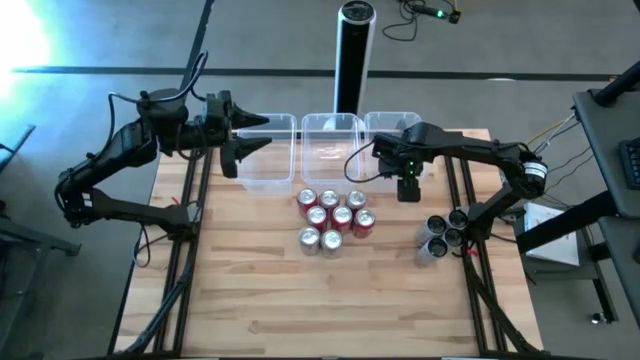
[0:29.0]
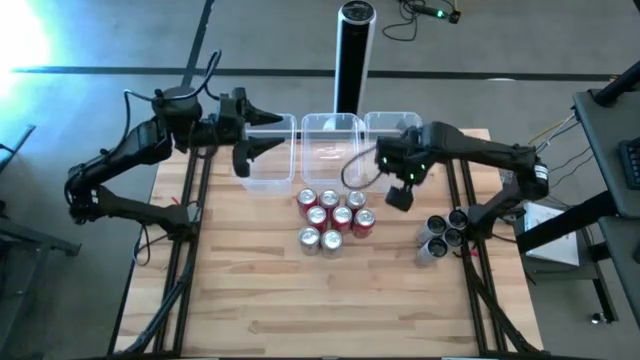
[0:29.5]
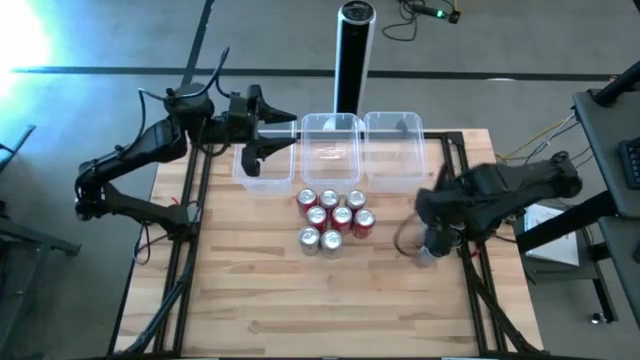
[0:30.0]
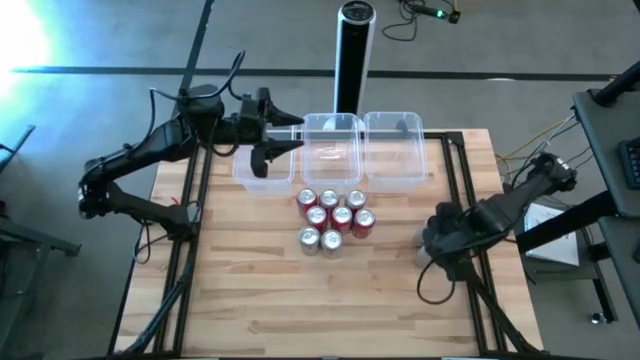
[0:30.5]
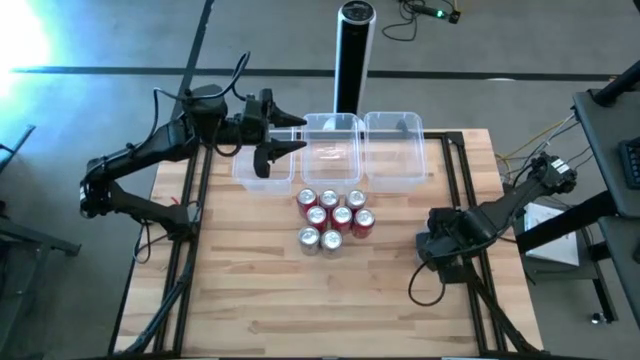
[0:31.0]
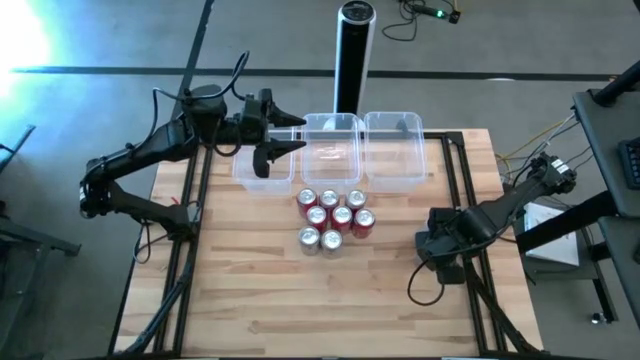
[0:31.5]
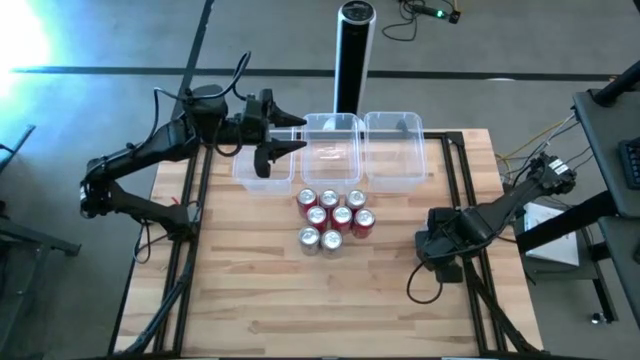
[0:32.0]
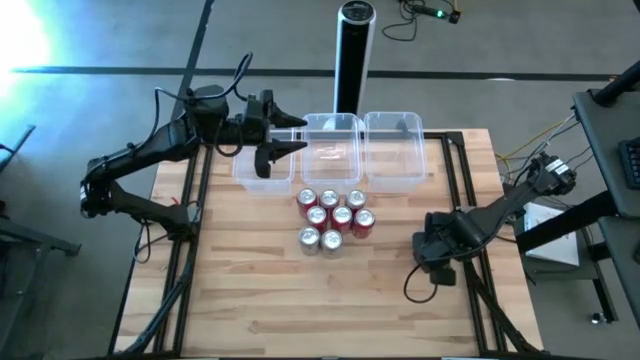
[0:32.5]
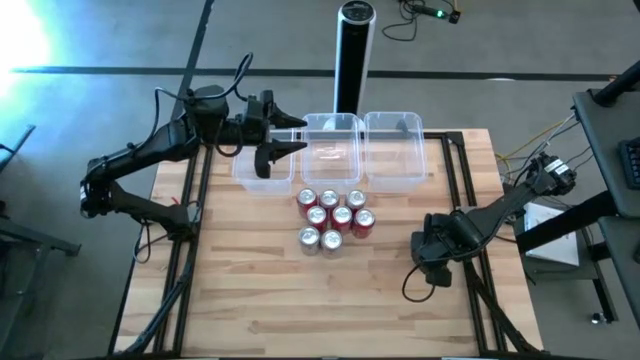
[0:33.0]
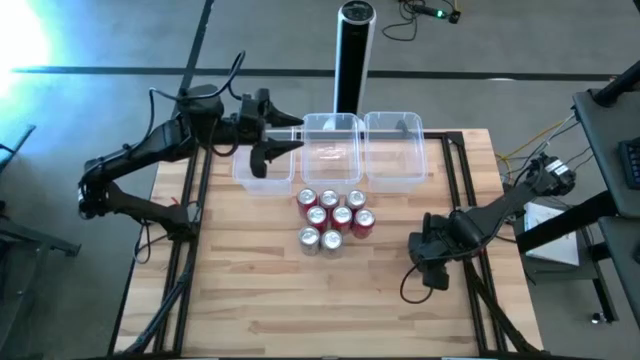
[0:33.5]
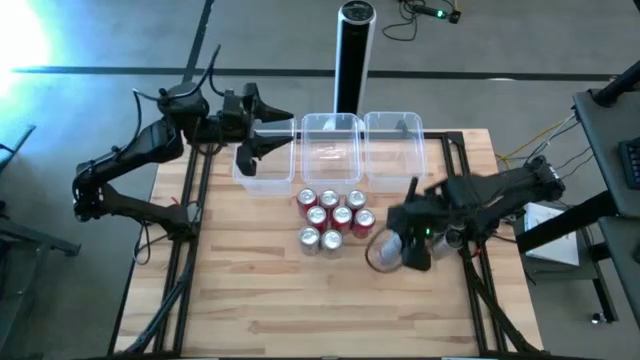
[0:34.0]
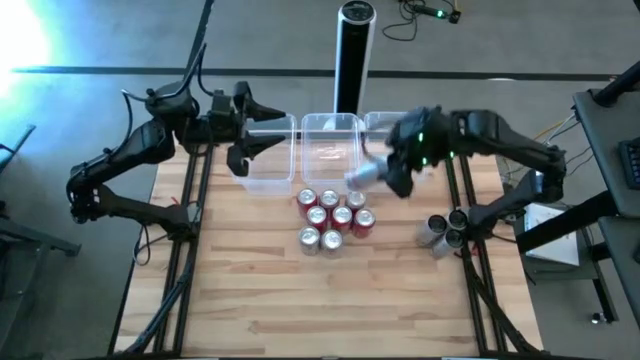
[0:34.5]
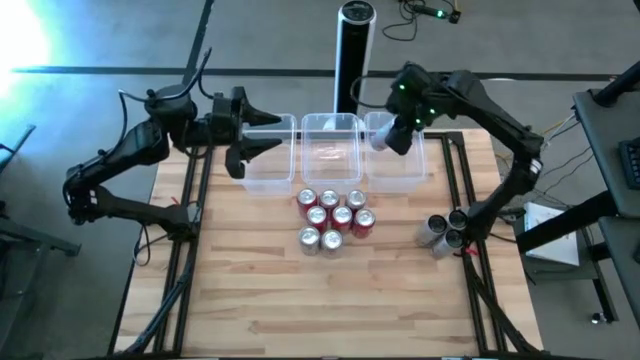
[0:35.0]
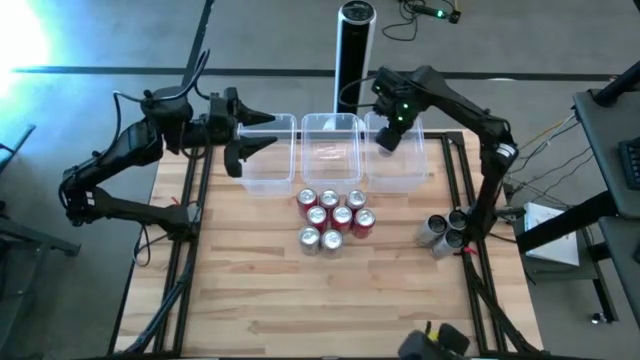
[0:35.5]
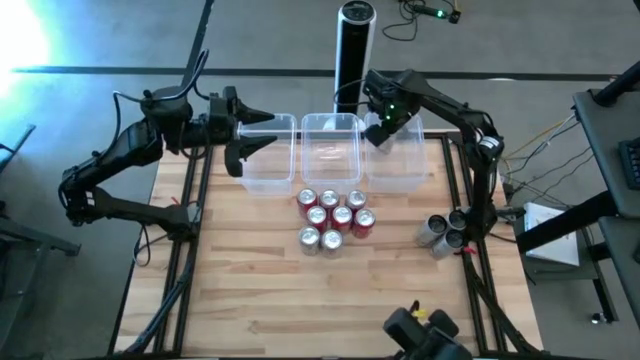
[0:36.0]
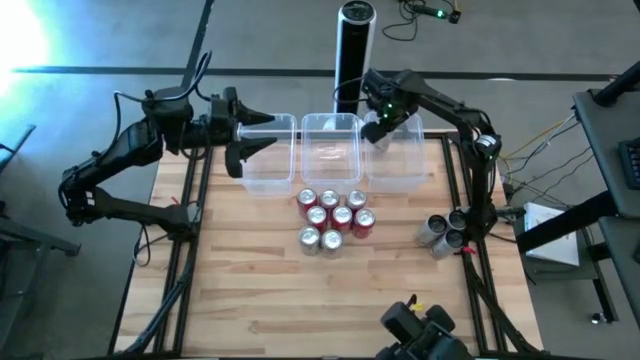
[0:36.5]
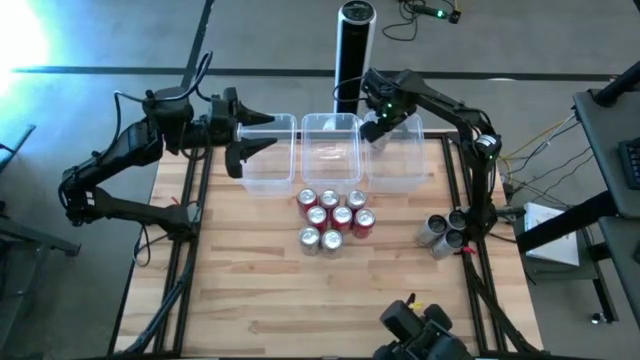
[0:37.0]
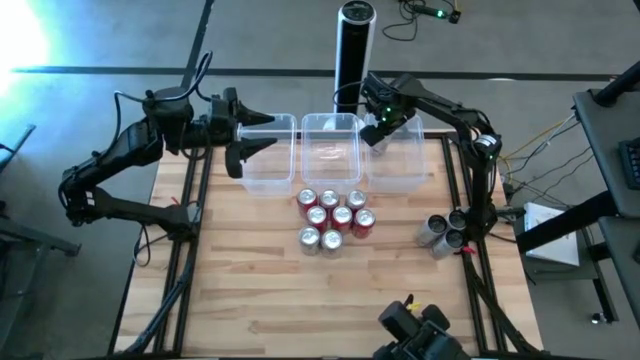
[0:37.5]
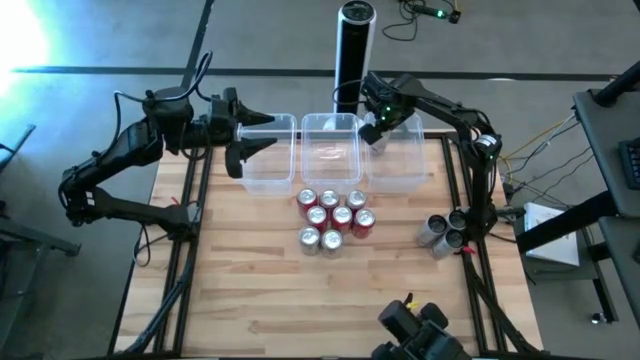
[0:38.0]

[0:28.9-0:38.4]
Task: Sort soda cans
Put the bottom left white-pink soda can into the right transparent bin

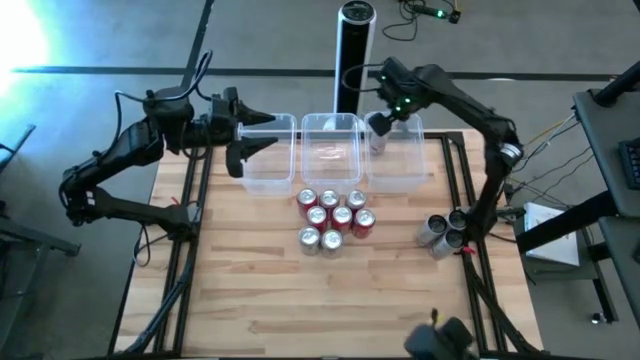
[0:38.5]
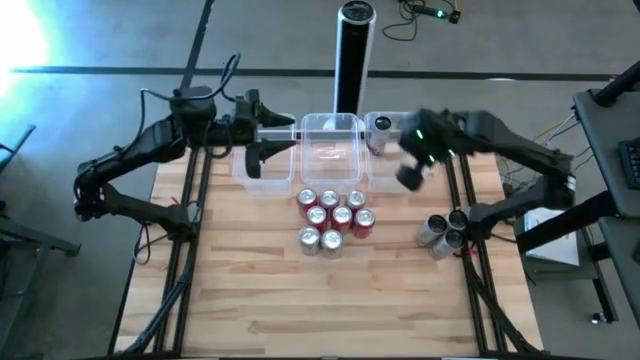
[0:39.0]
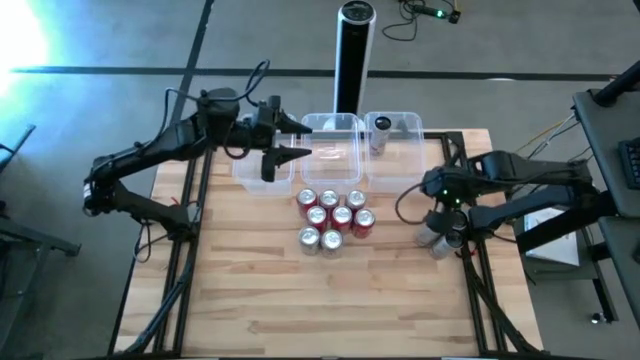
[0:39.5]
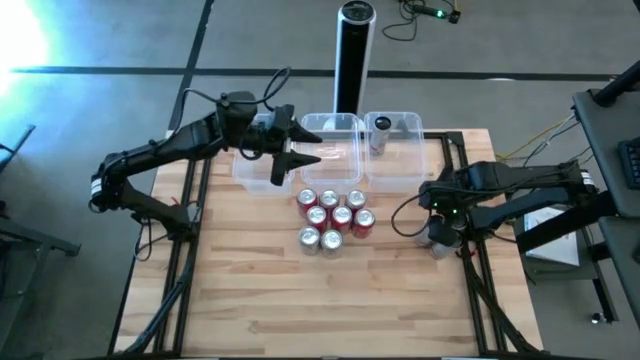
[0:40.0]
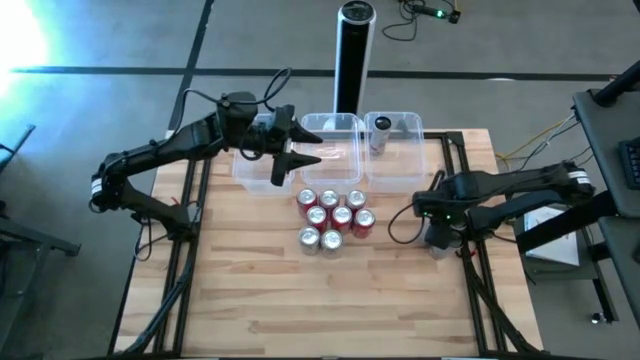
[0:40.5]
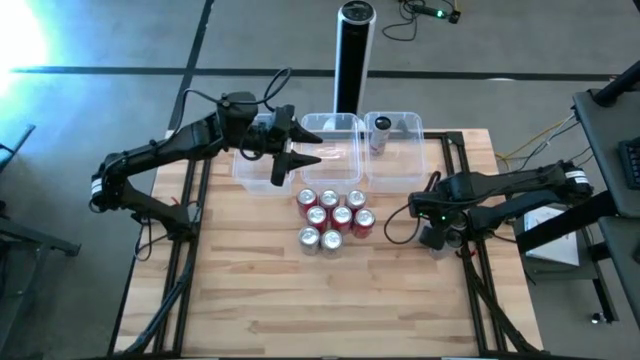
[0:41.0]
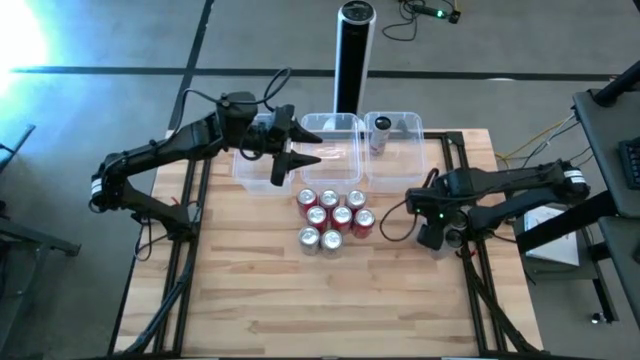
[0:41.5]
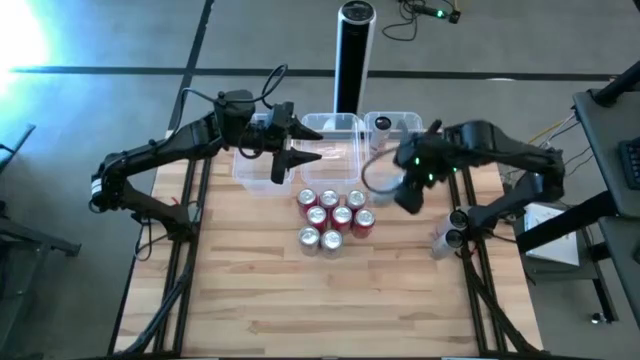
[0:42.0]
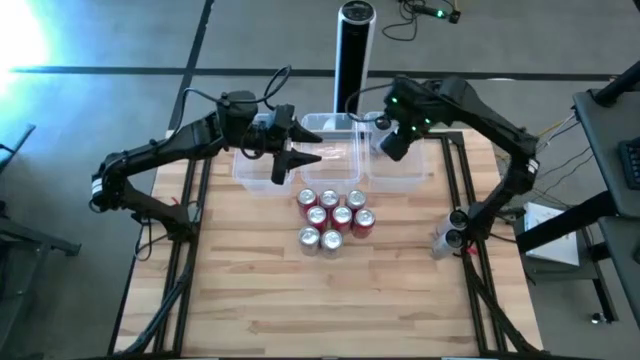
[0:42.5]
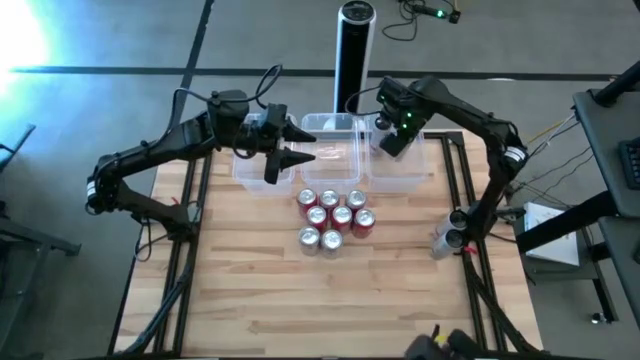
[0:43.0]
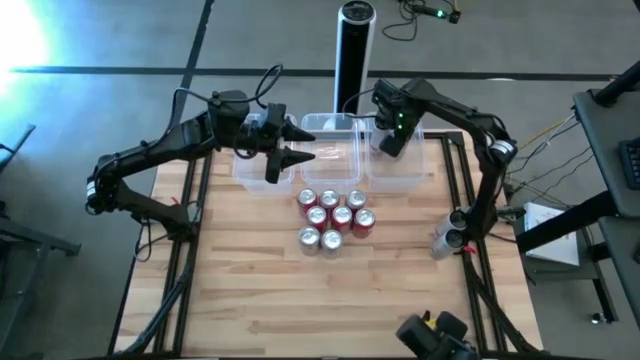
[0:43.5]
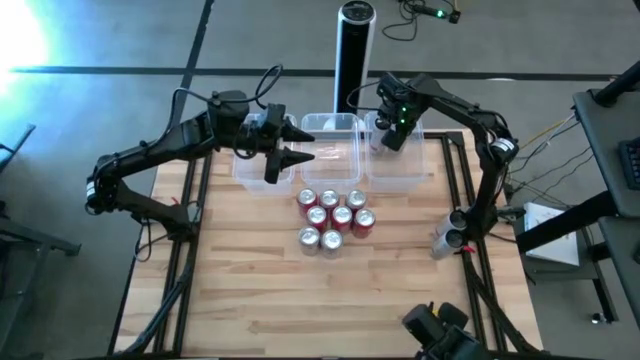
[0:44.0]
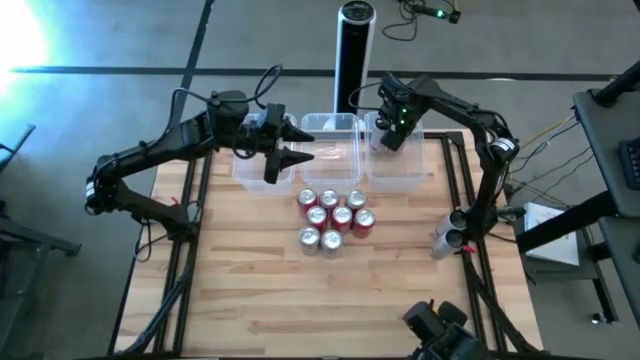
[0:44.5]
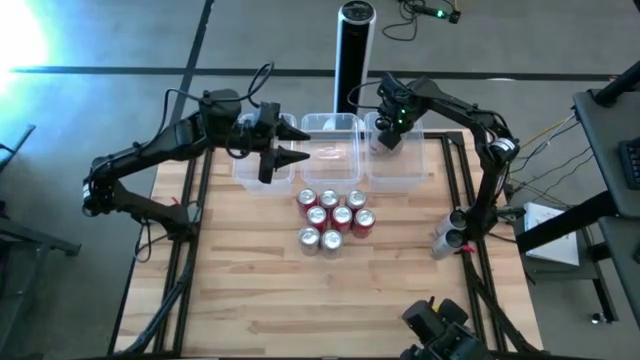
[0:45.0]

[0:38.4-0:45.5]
Put the top left white-pink soda can into the right transparent bin

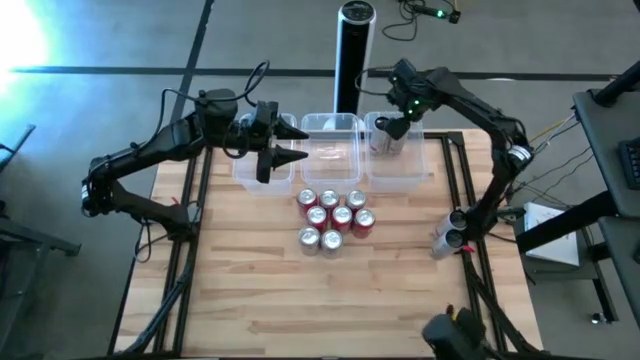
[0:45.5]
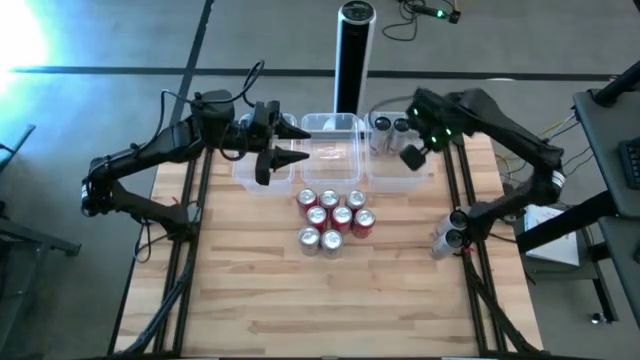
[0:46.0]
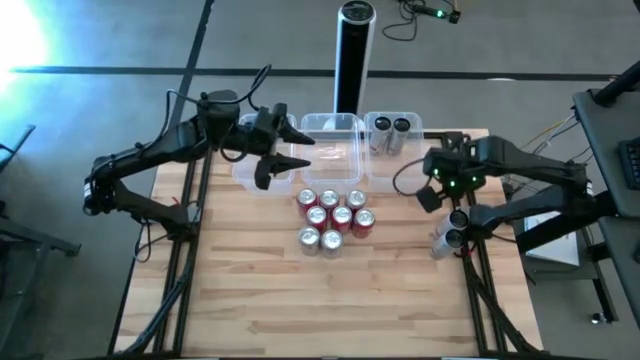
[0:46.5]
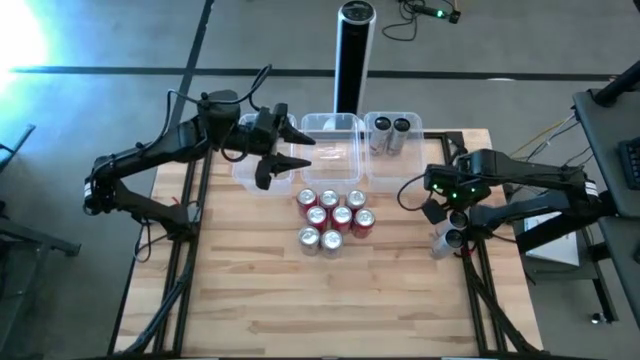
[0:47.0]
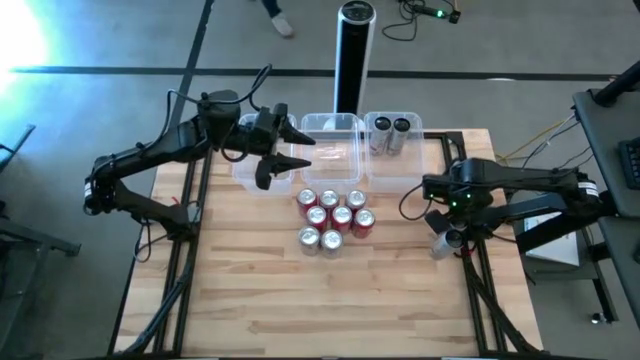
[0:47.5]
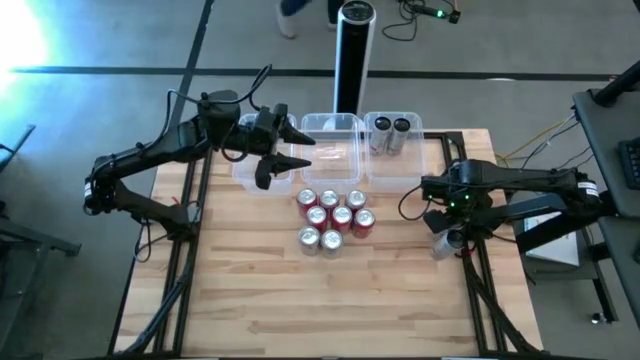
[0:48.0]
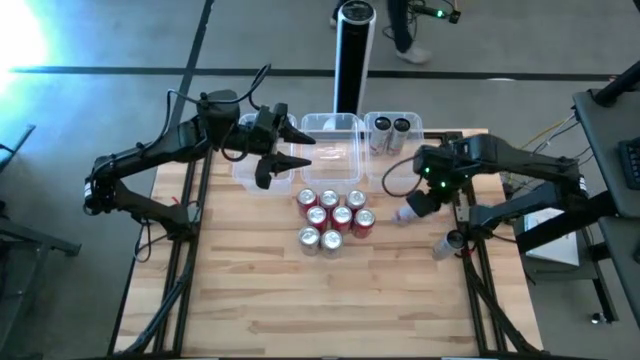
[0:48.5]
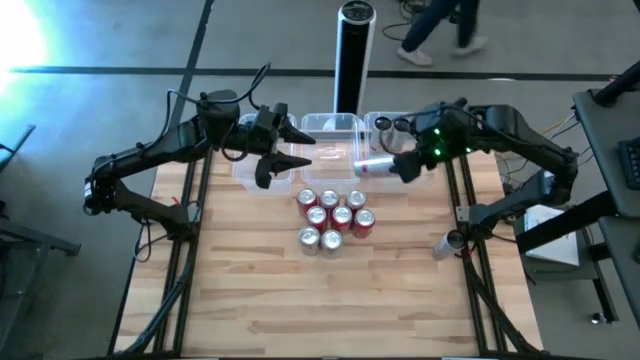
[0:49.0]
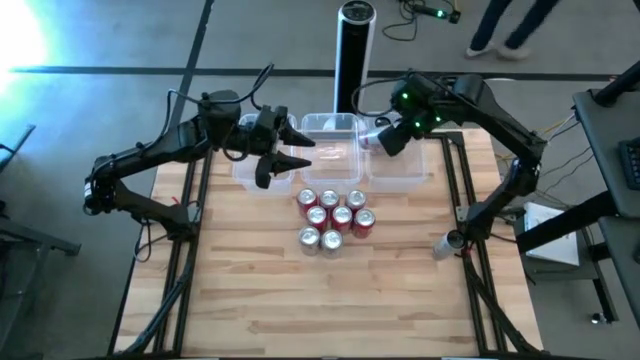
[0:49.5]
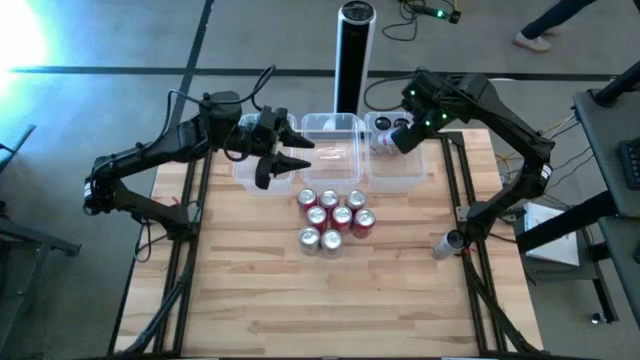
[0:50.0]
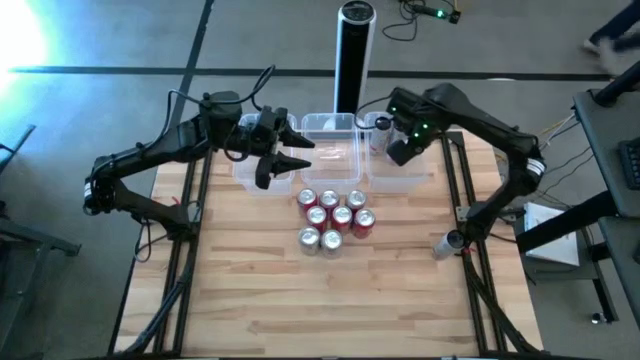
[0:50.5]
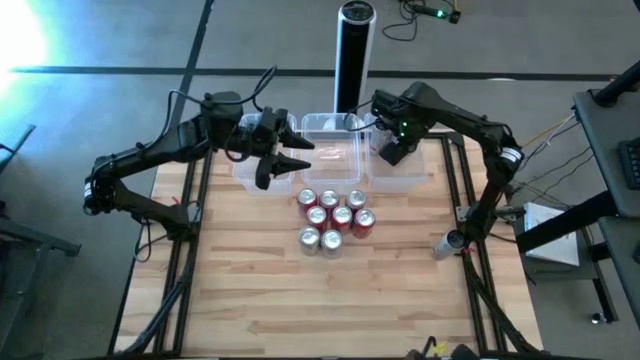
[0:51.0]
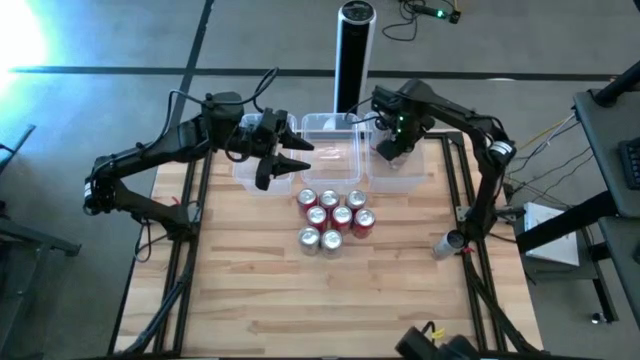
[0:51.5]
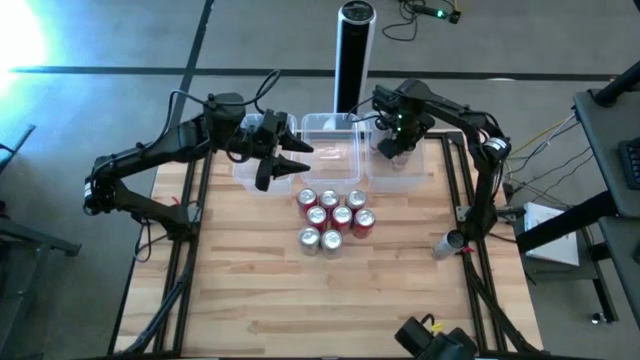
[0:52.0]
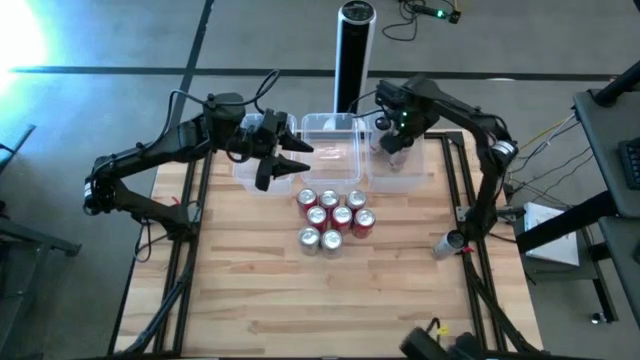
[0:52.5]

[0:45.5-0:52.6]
Put the top white-pink soda can into the right transparent bin
